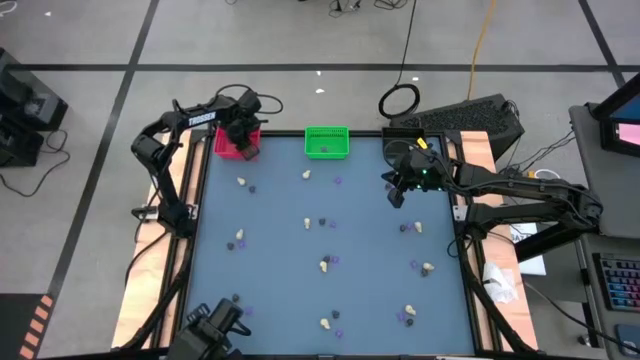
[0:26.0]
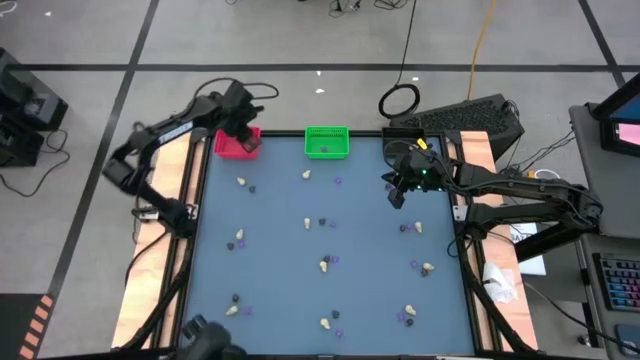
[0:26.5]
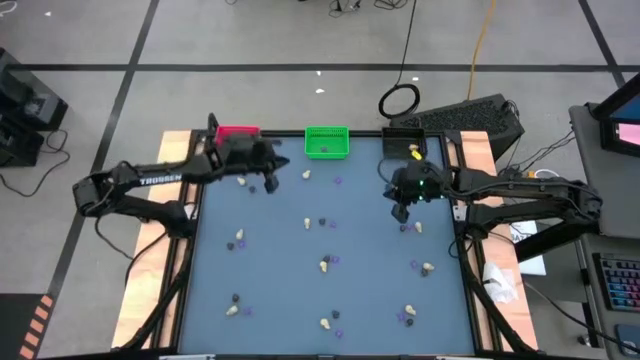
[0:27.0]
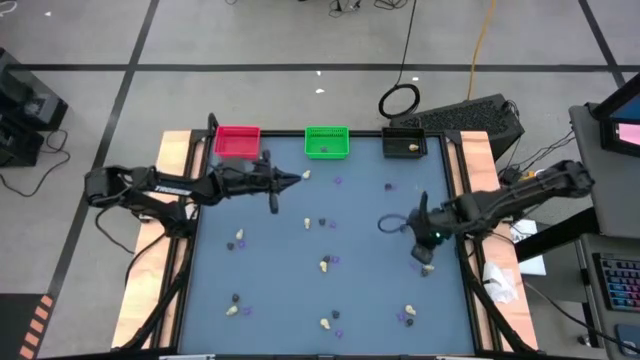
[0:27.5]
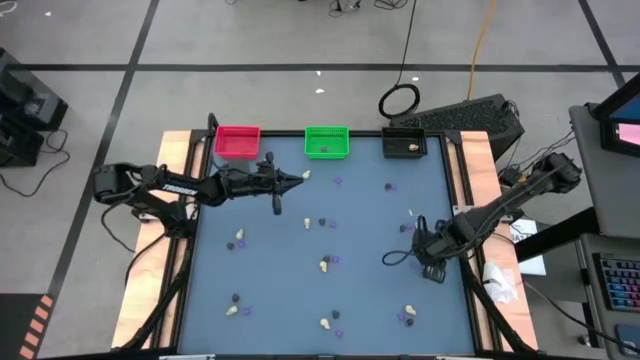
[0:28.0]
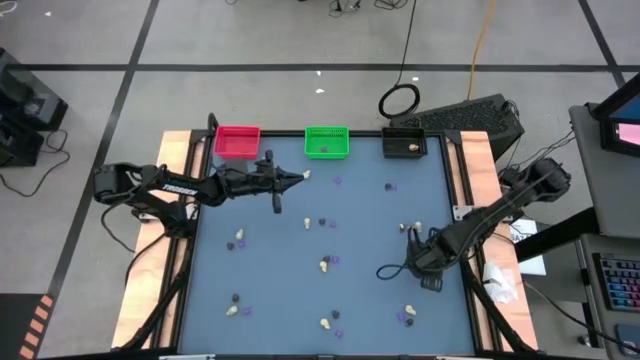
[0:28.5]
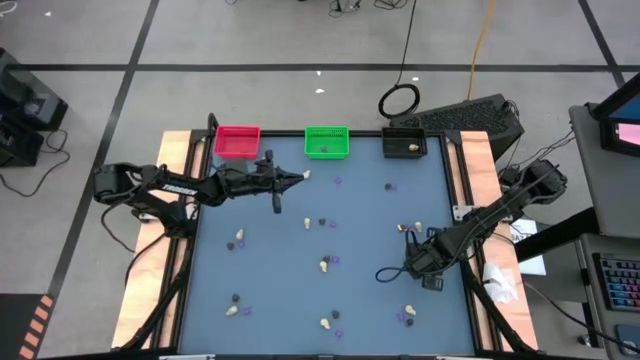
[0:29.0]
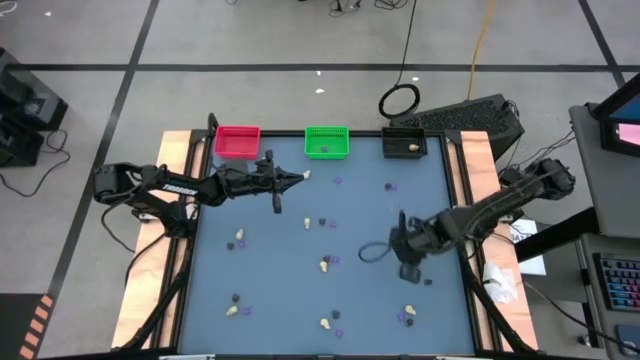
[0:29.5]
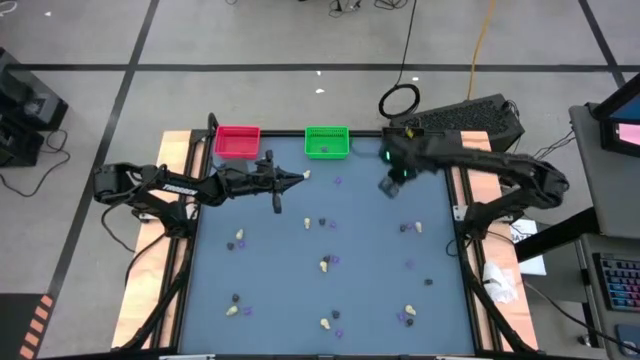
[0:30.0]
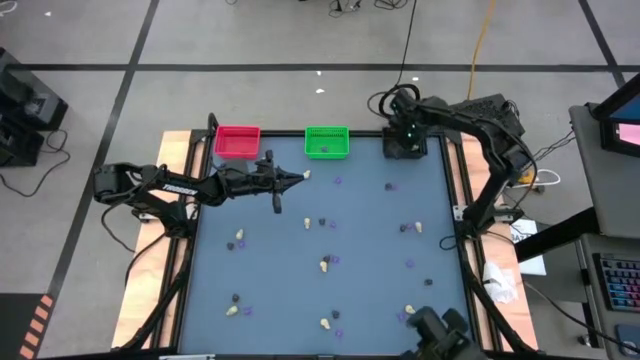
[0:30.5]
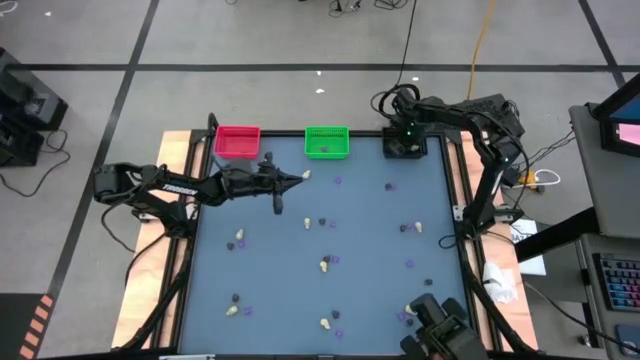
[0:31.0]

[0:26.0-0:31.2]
Task: Sort Halloween decoration
Put the white skull toy into the black bin

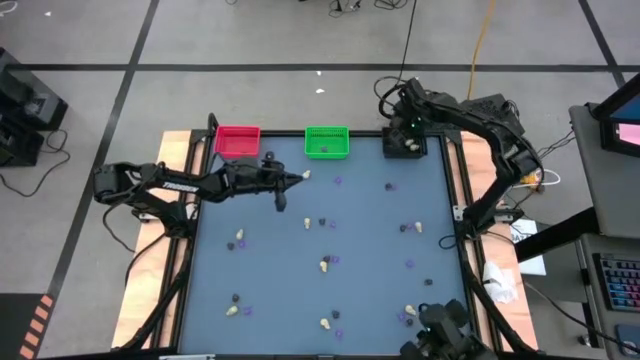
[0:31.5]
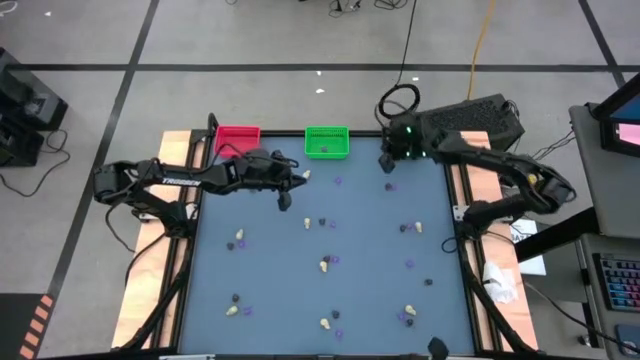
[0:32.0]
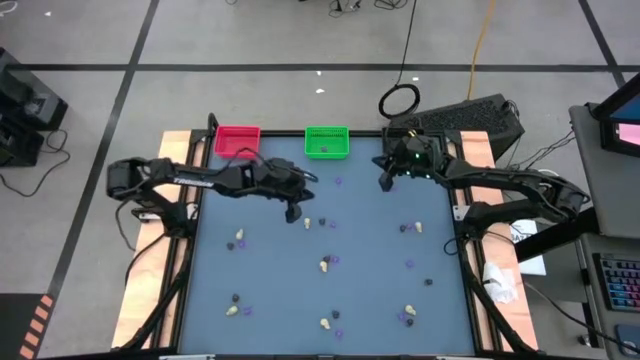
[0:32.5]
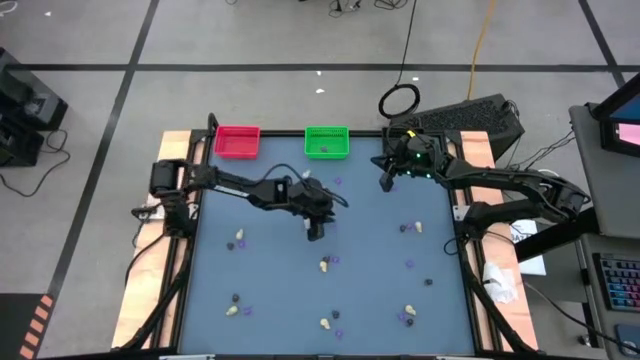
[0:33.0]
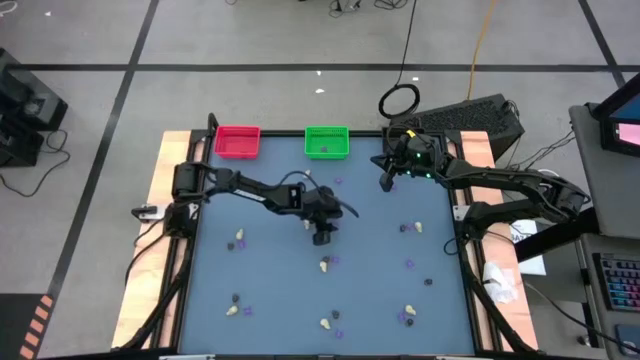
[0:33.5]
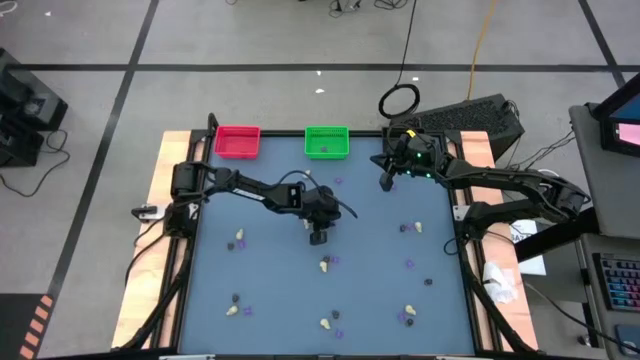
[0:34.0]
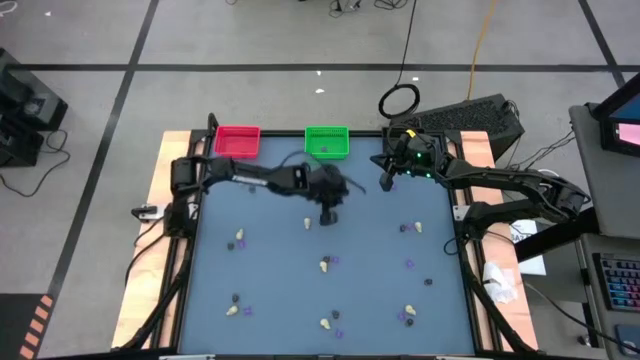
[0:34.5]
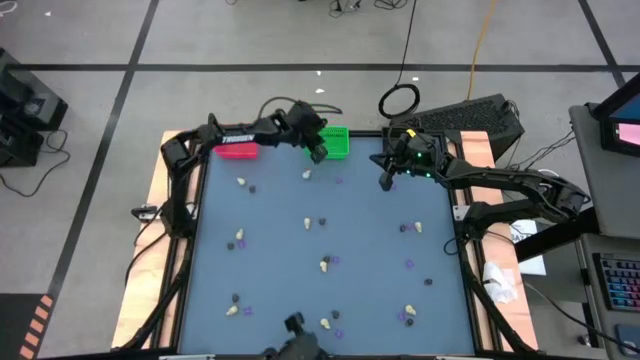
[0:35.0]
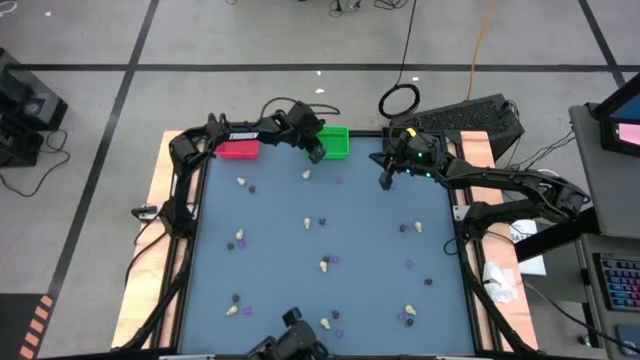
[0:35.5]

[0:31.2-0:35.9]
Put the purple spider toy into the green bin

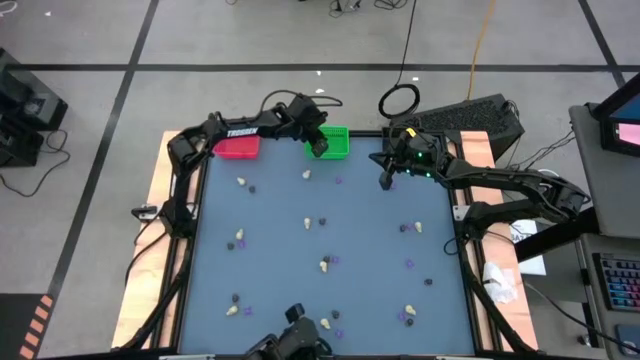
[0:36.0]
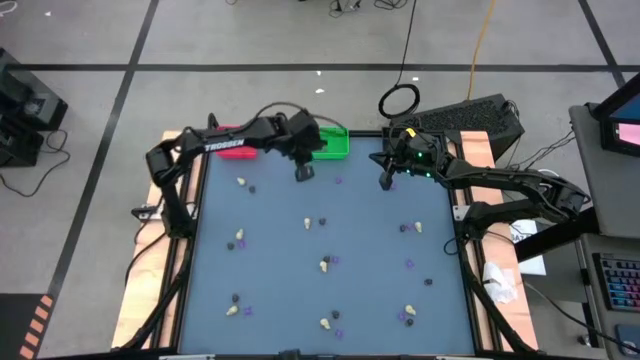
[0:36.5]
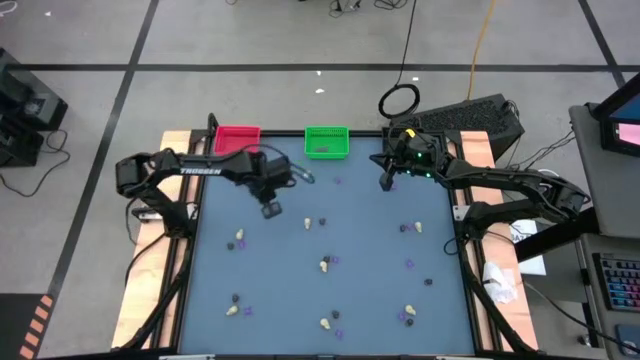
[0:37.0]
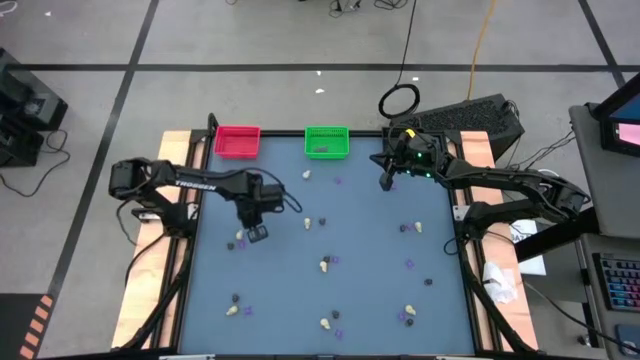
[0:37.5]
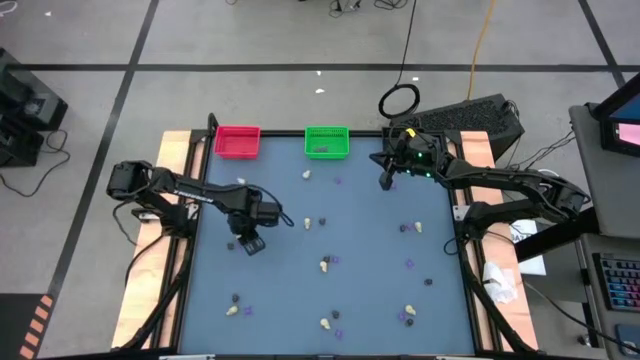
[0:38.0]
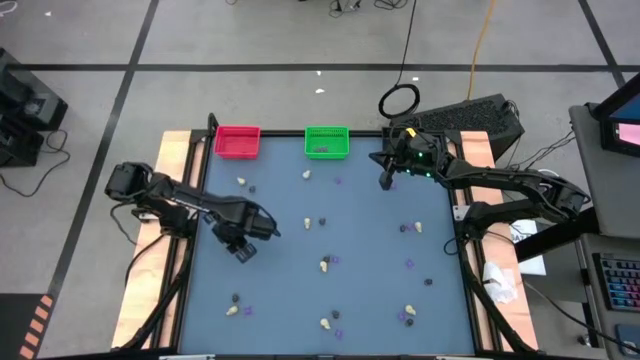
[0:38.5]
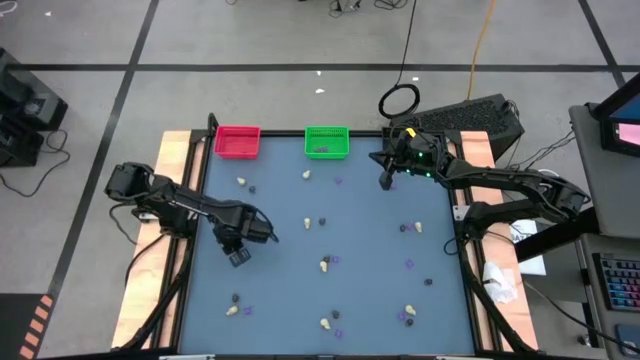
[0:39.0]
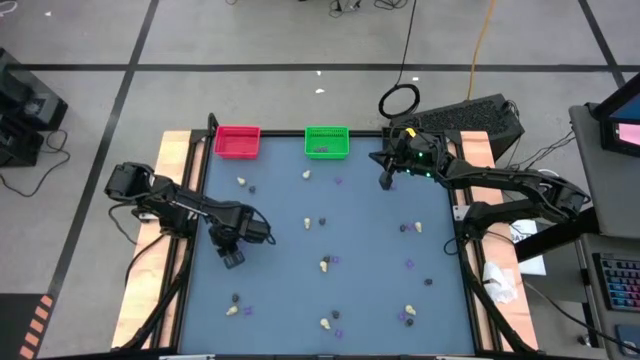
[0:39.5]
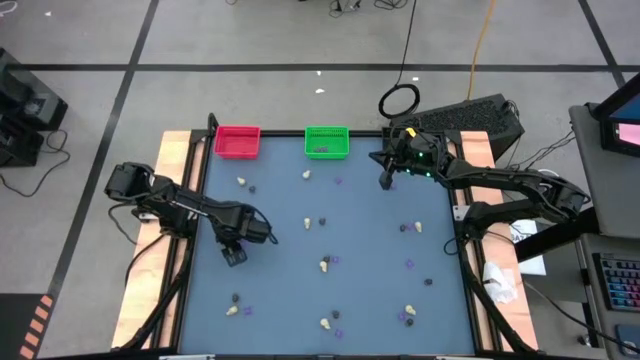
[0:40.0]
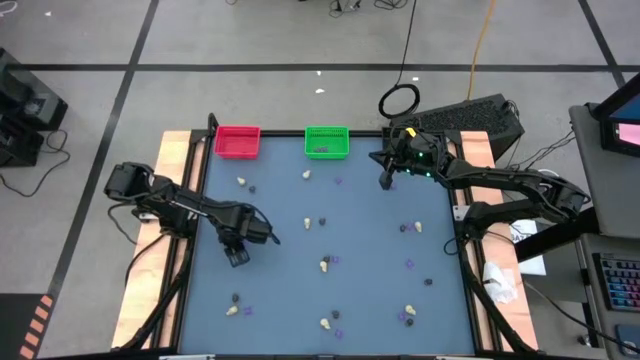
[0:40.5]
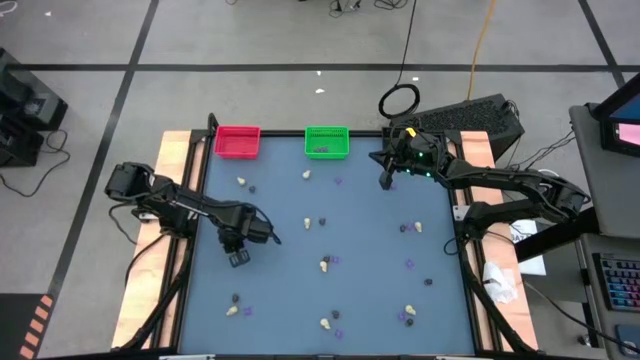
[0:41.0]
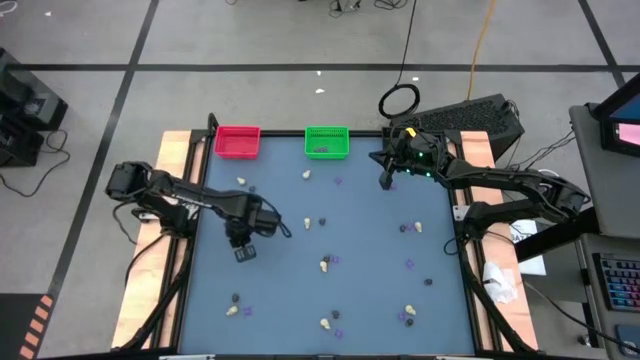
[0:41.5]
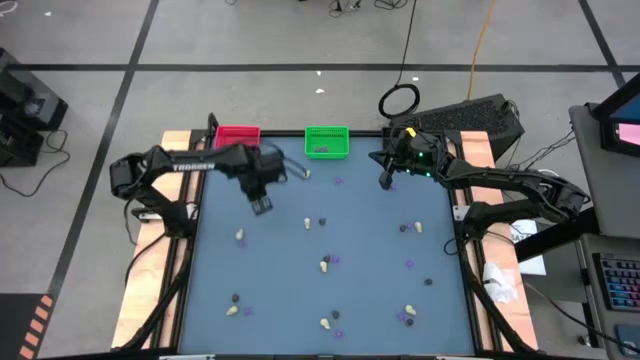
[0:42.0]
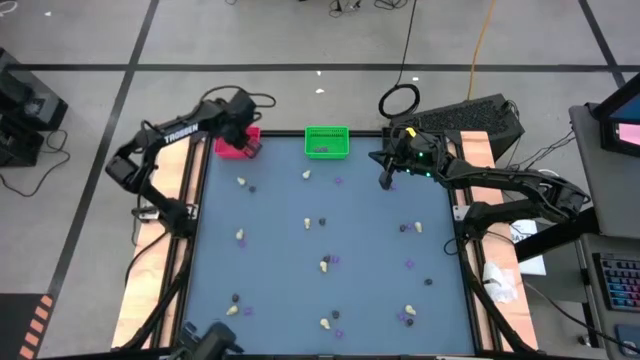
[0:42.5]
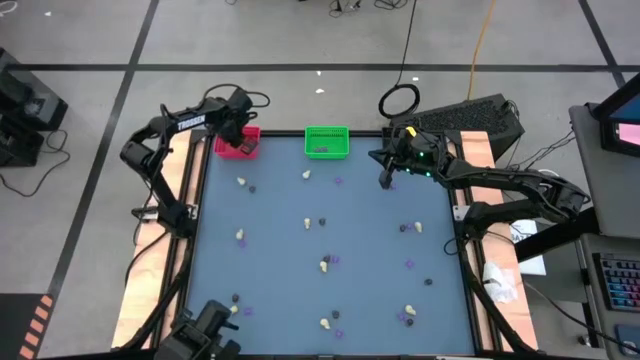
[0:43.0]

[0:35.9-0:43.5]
Put the black skull toy into the red bin

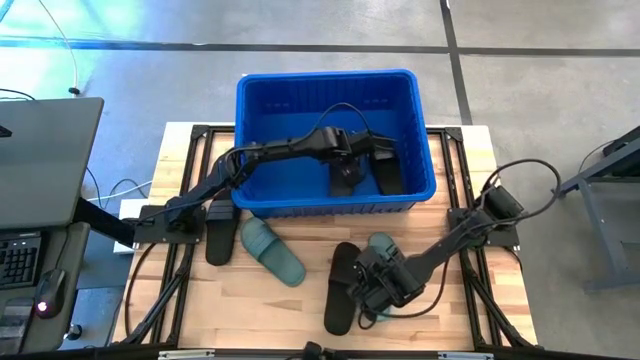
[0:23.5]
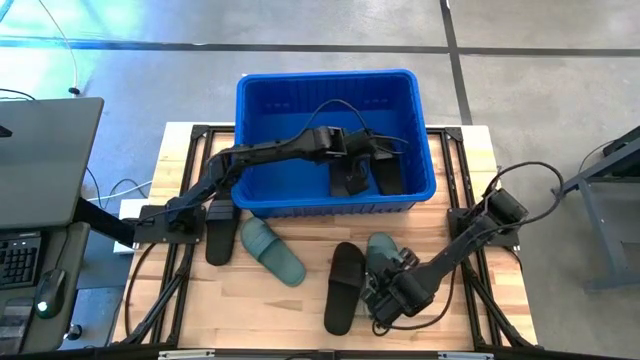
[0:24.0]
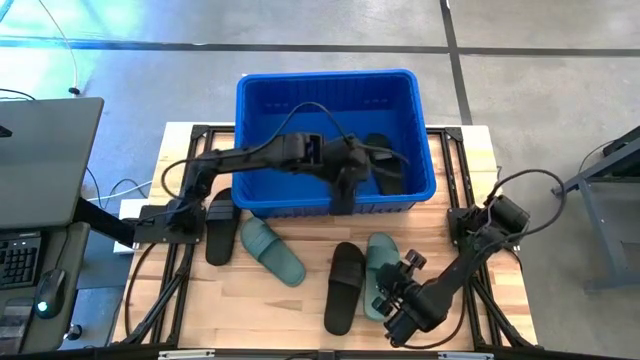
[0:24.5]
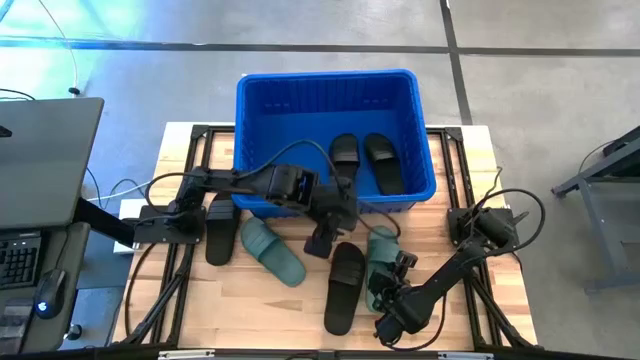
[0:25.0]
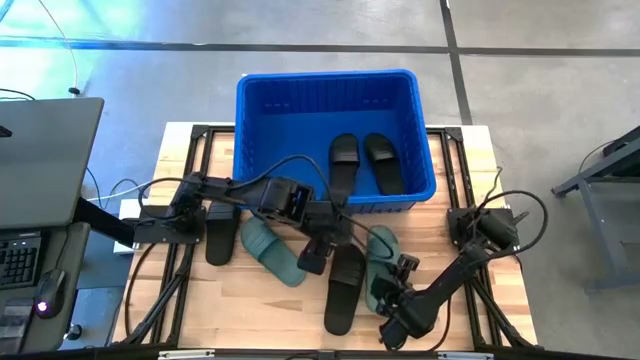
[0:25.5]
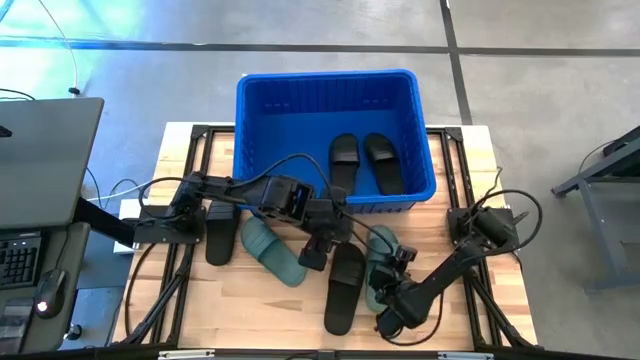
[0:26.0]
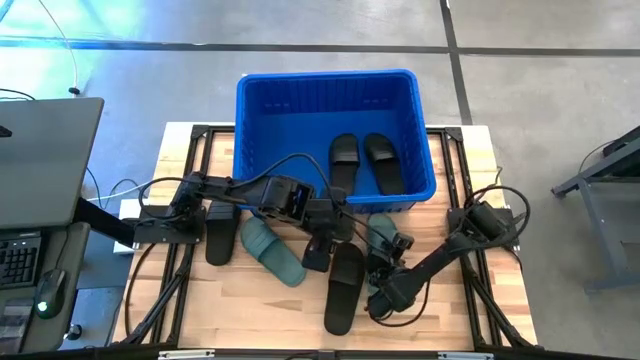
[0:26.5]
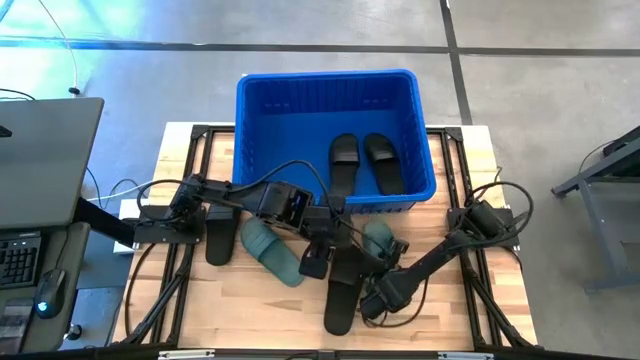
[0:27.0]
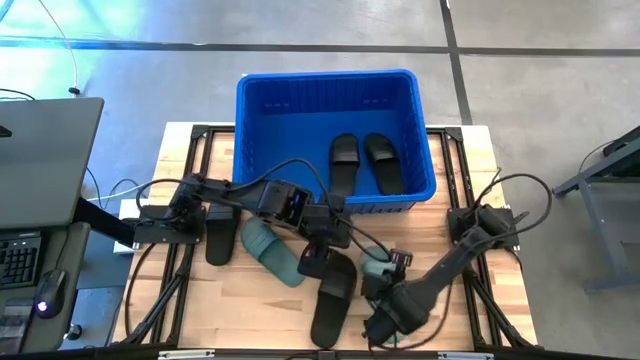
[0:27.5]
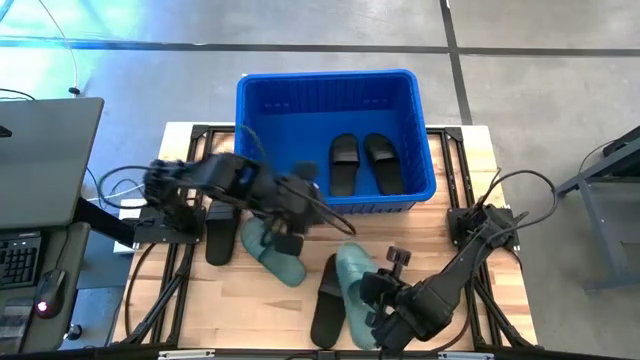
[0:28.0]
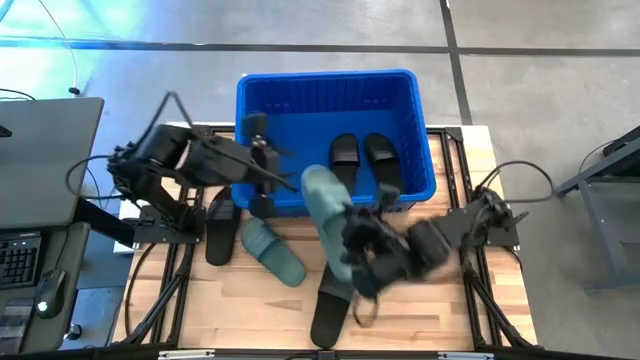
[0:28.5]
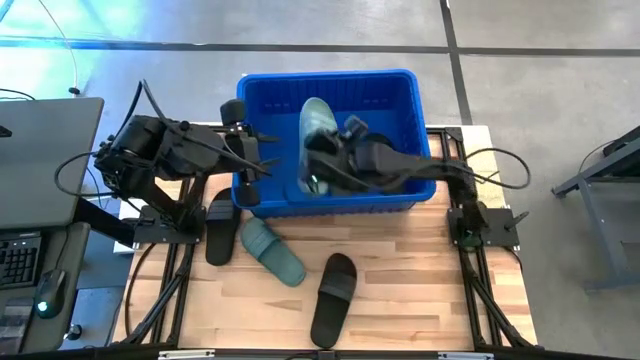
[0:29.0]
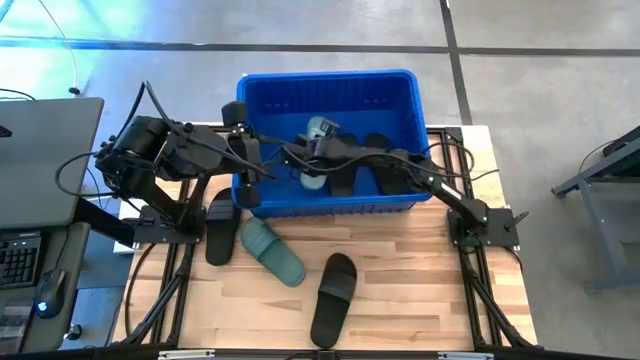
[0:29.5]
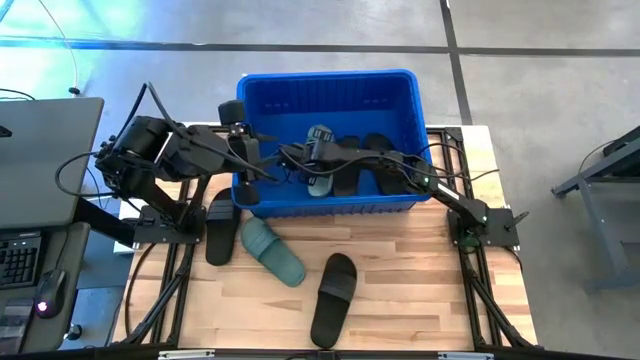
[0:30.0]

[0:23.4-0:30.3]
Task: Pick and place slides into bin
Put the green slide into the blue bin
